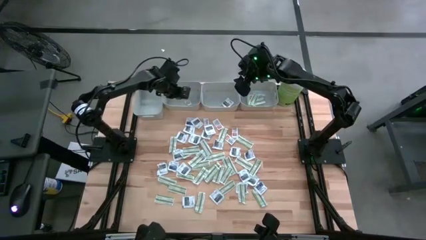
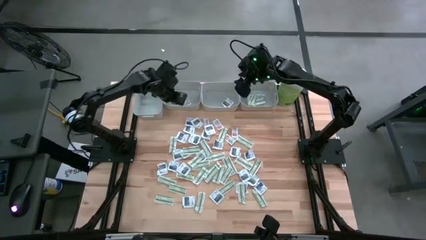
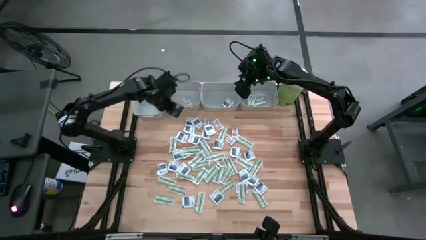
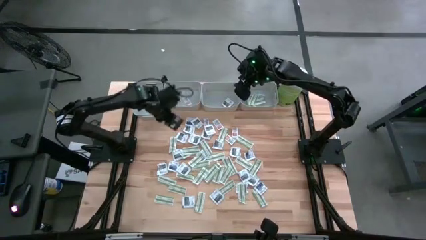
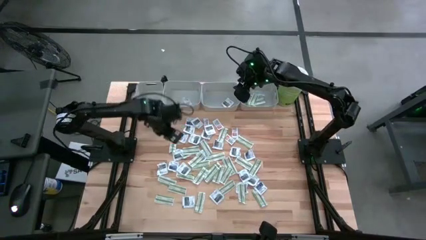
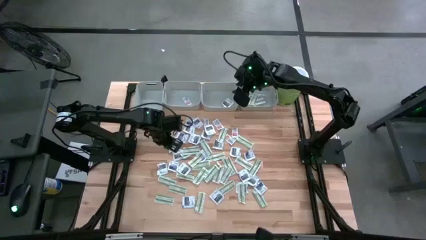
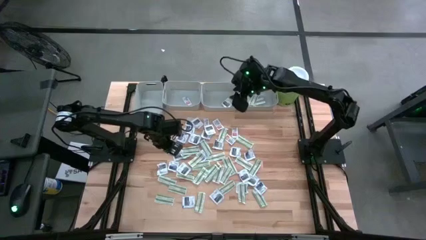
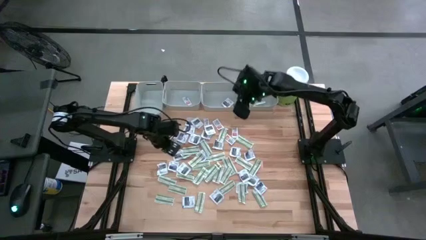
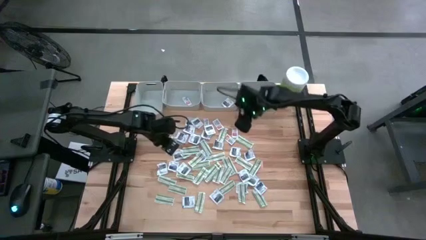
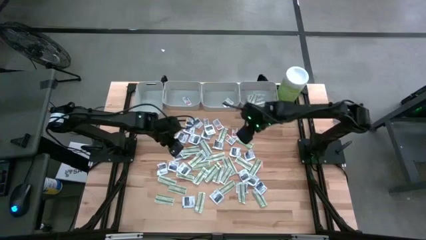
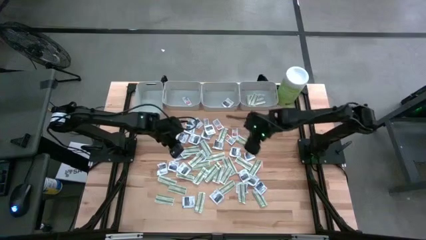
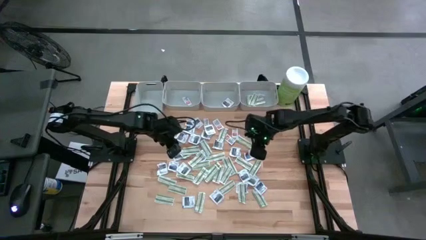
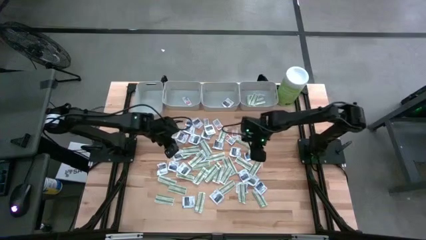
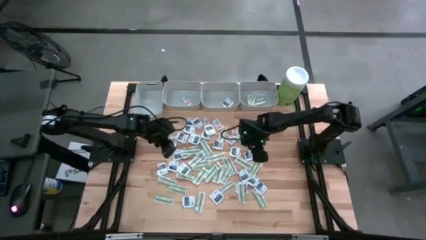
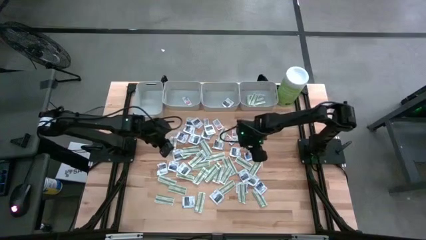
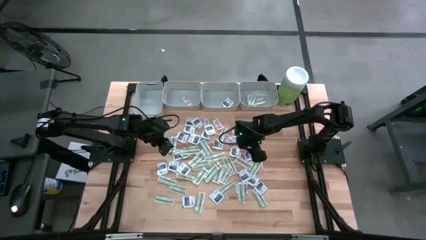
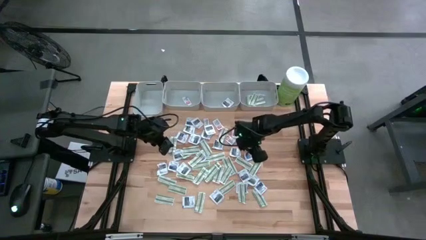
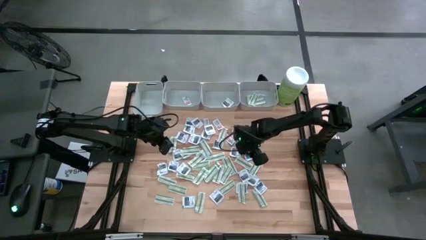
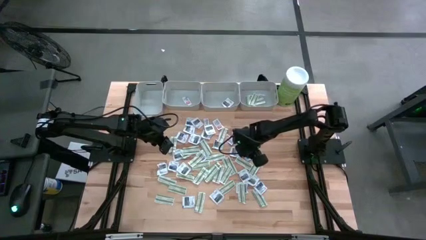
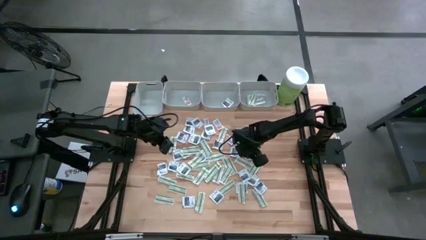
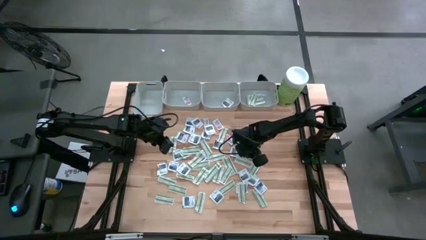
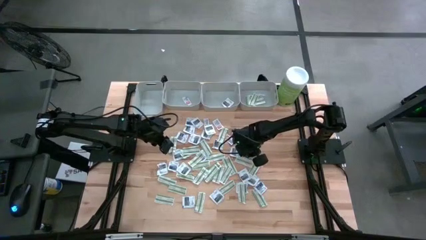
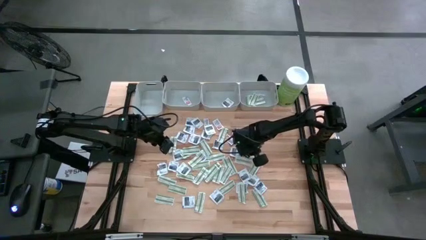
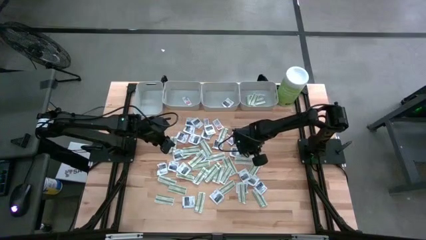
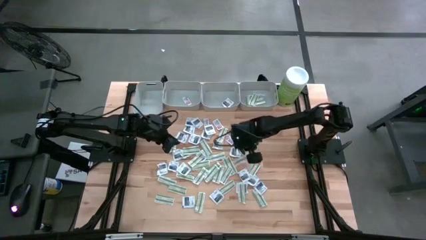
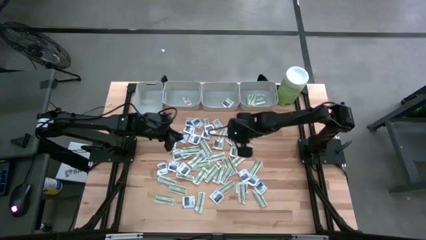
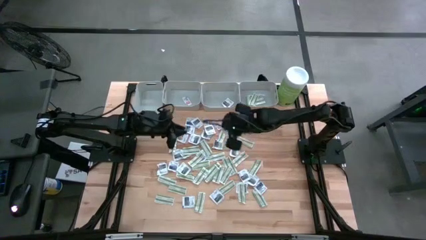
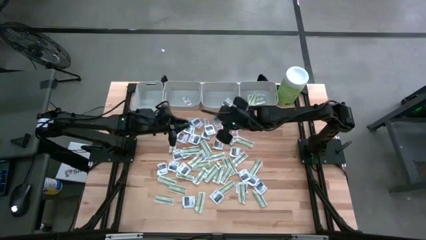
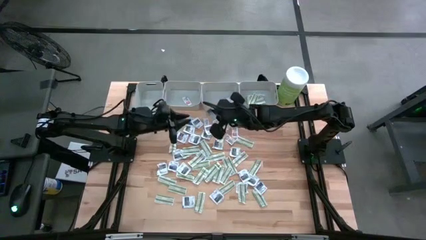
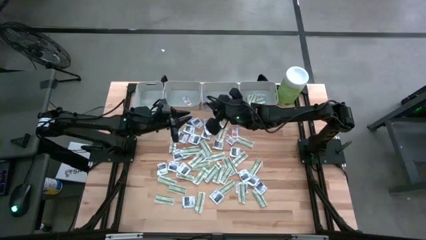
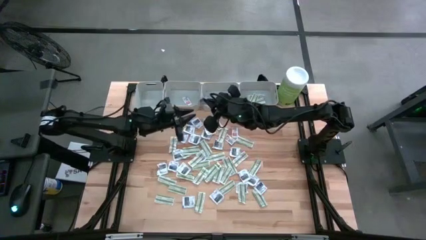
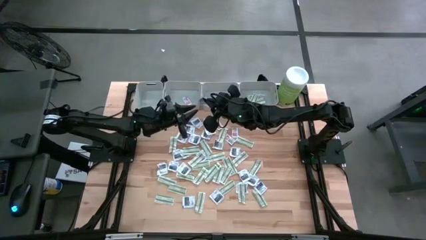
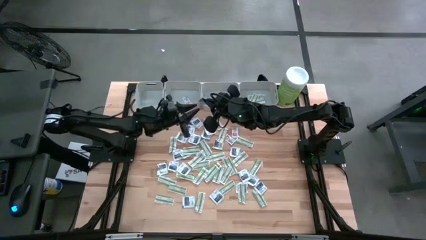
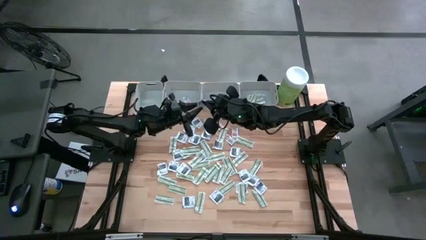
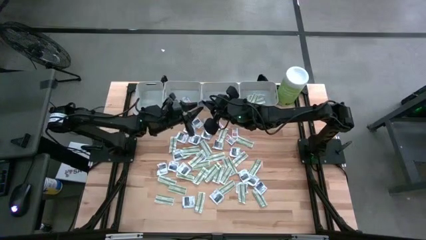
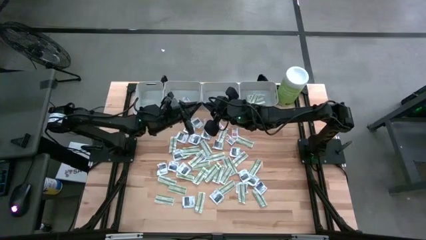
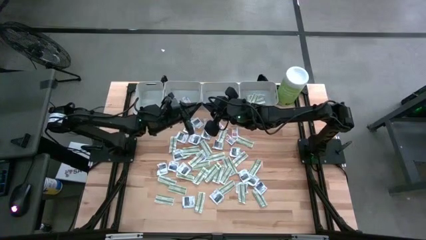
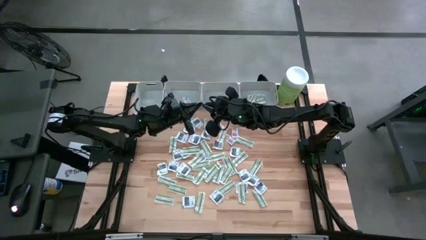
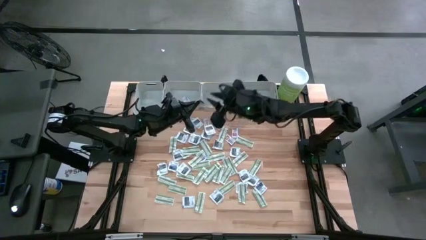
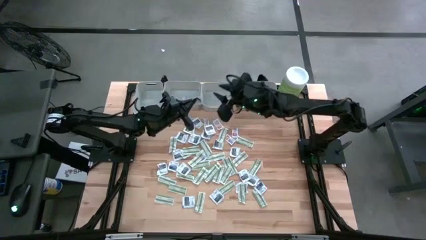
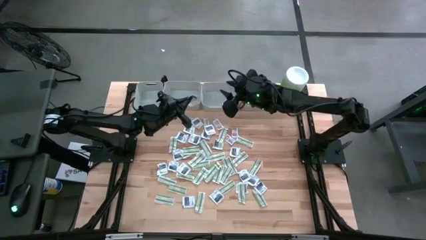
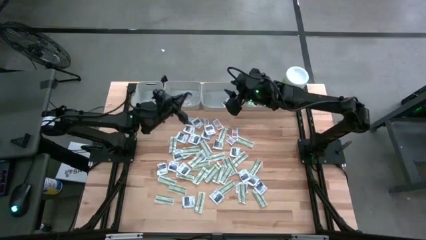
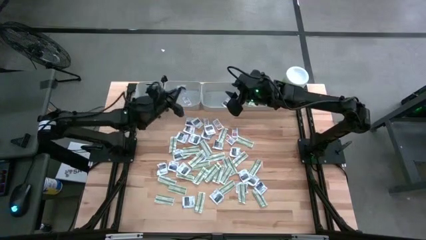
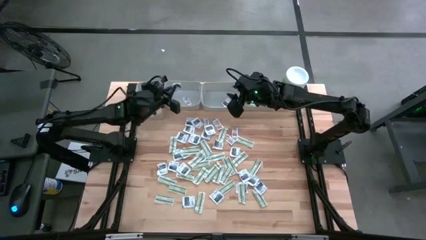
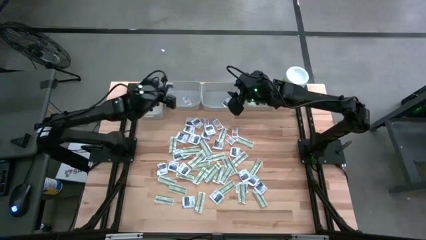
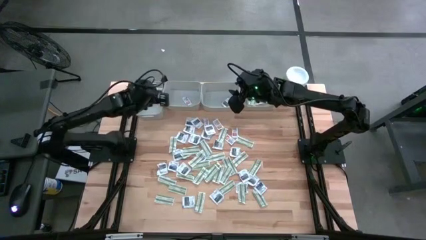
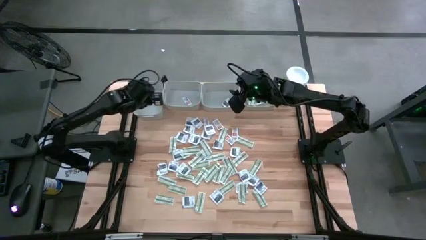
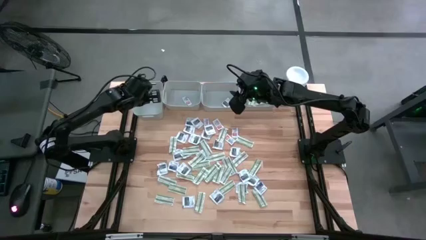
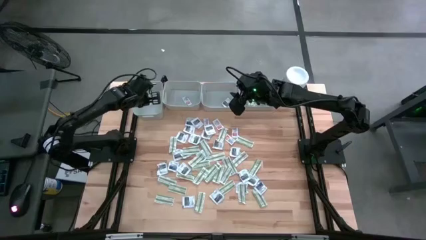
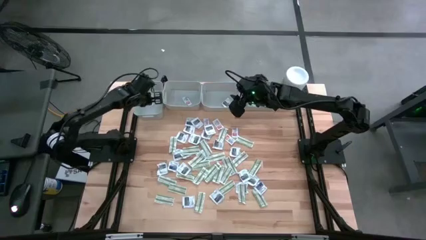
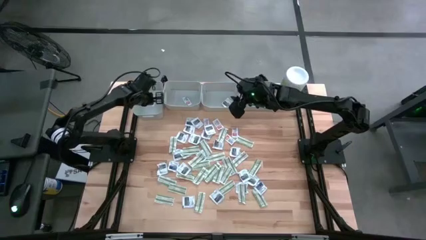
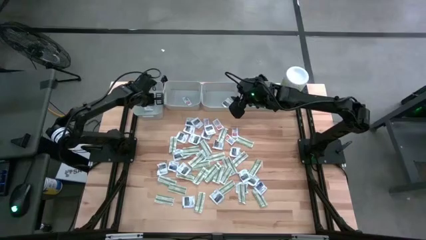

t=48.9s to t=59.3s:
Task: Pick & Place First Aid Supplies
Put the blue alcohol pad into the left gray bin

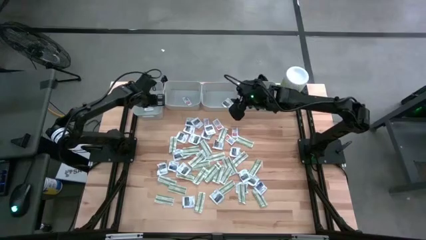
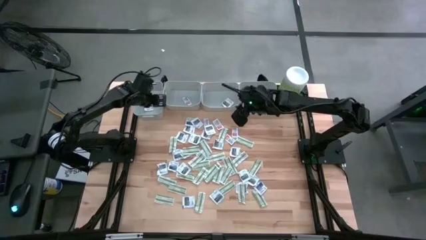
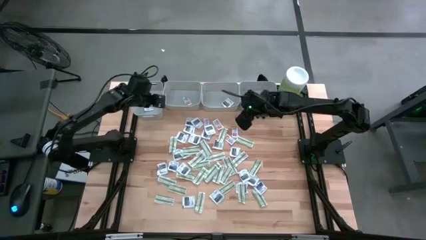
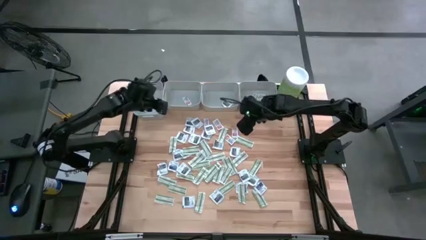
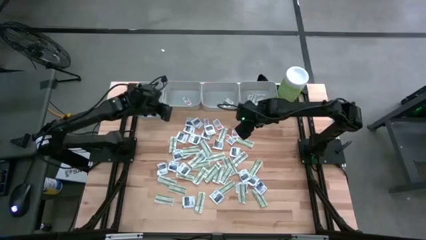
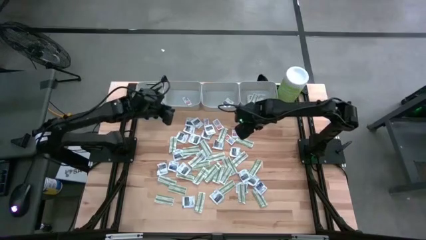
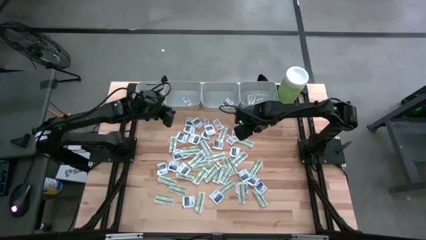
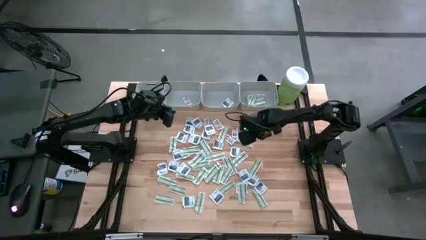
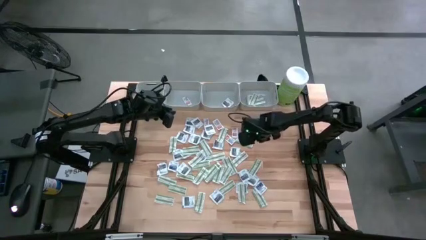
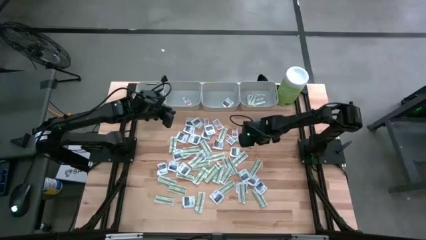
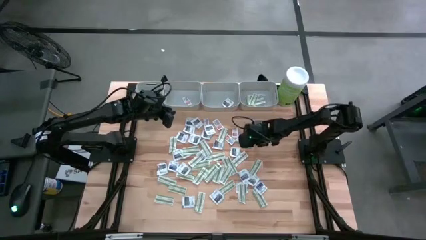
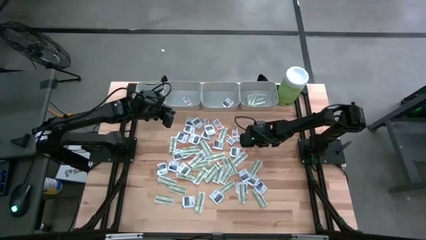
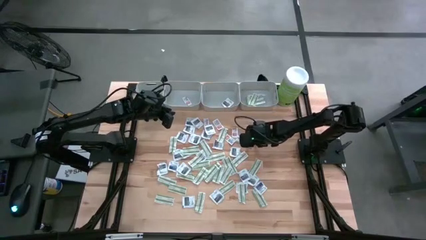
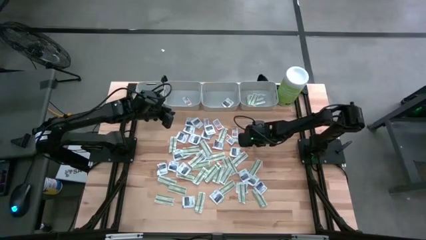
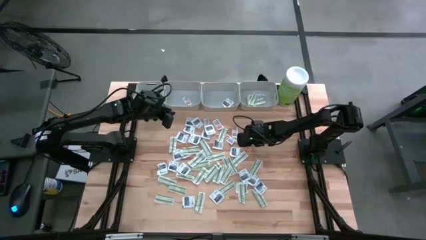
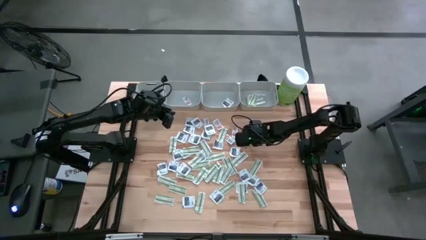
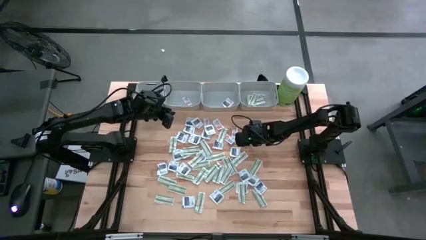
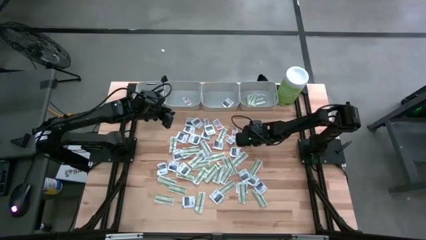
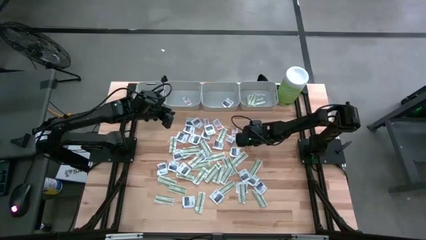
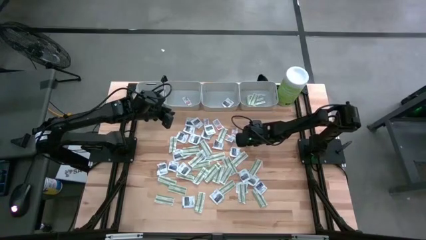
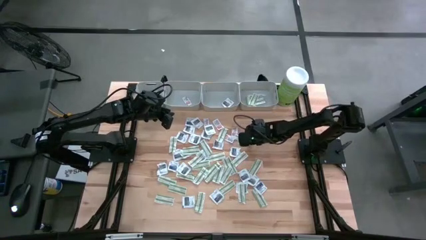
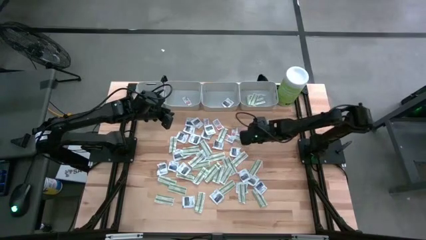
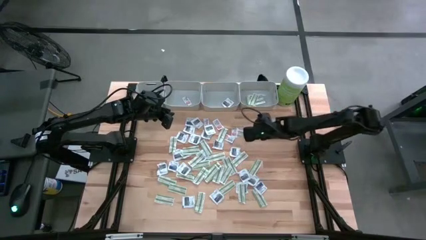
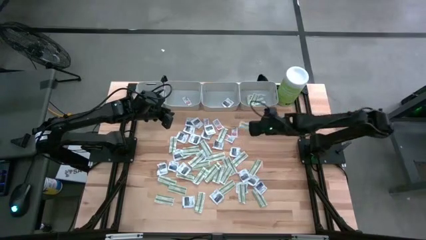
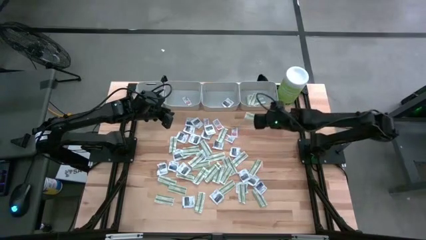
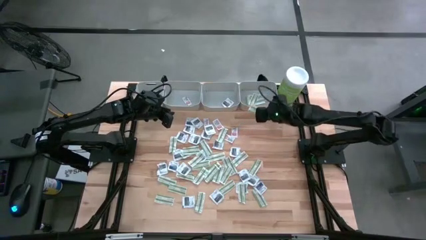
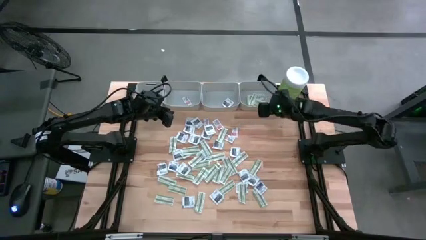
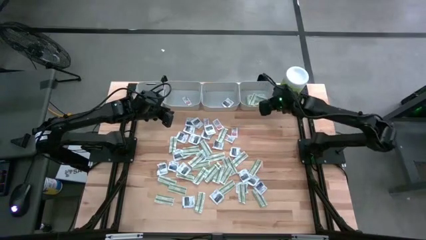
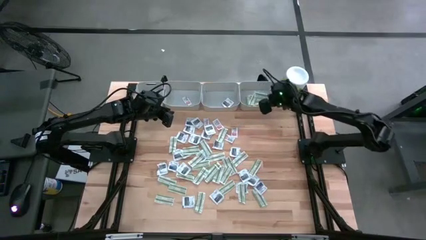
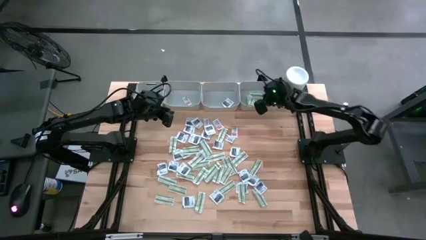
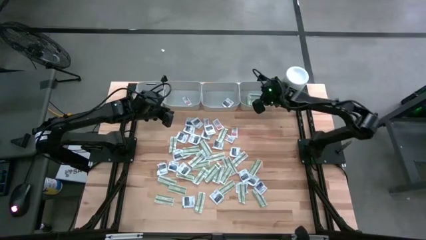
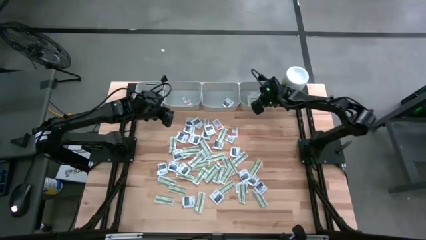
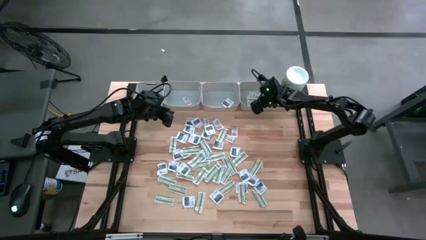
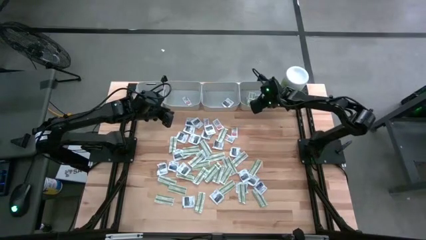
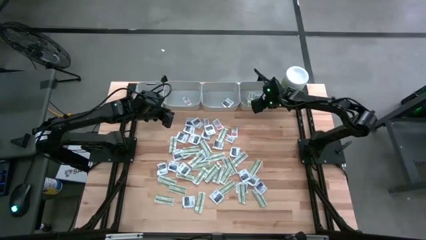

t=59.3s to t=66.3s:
Put the green bandage into the right gray bin
